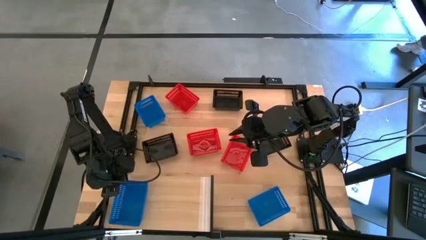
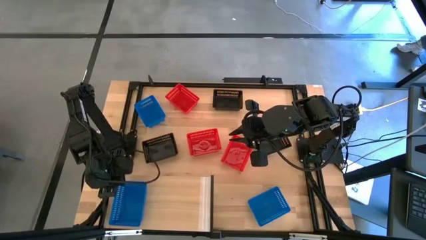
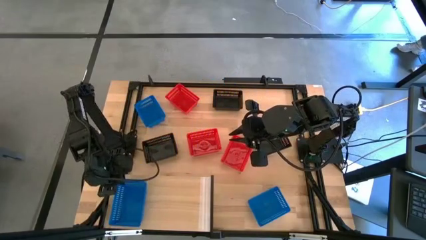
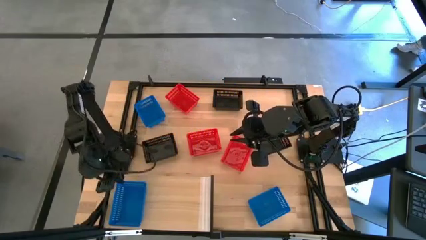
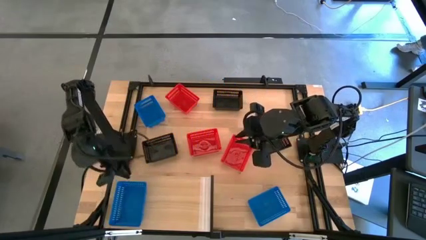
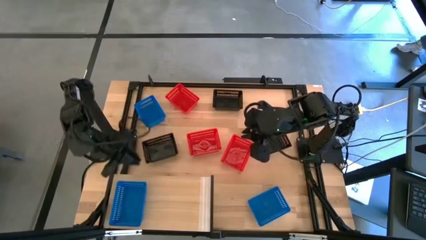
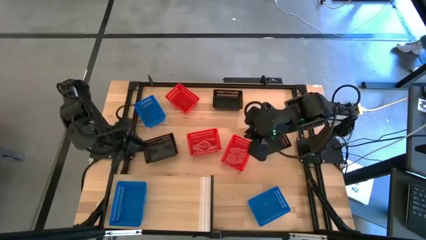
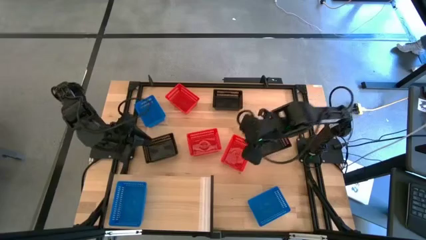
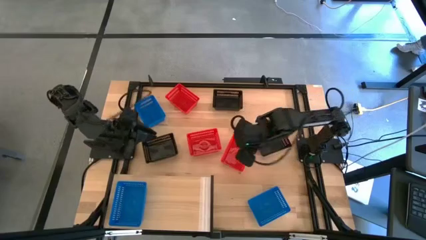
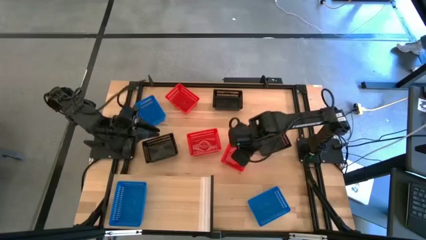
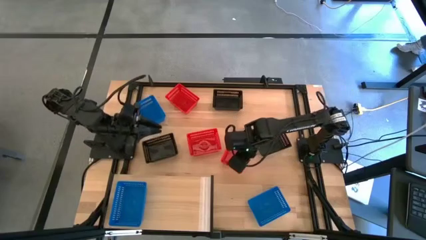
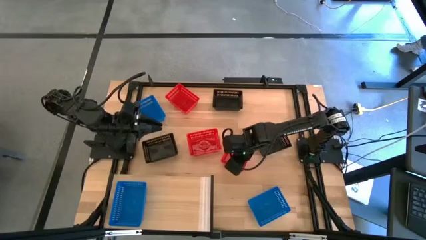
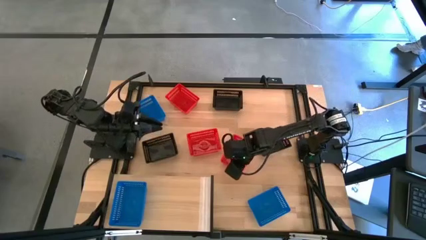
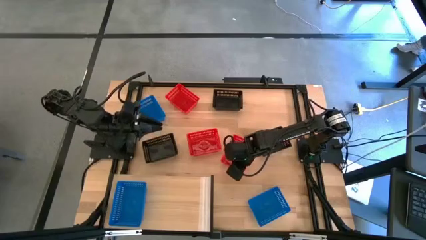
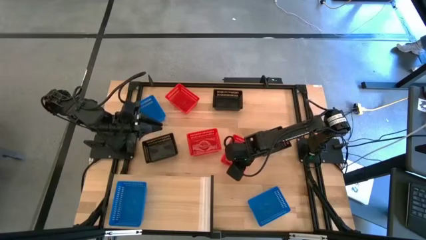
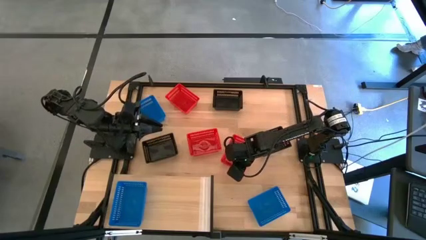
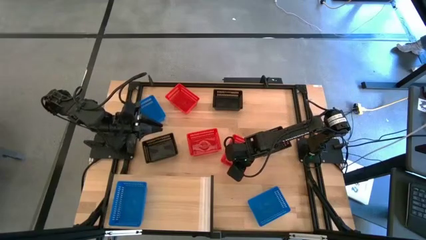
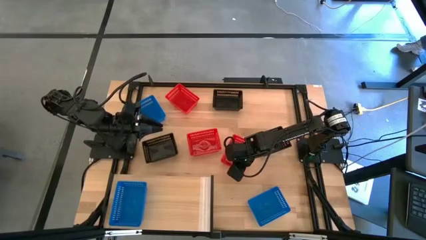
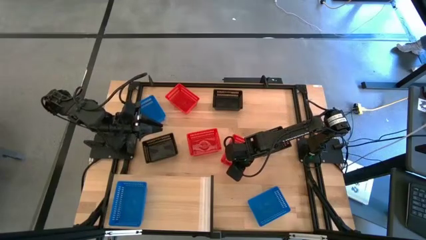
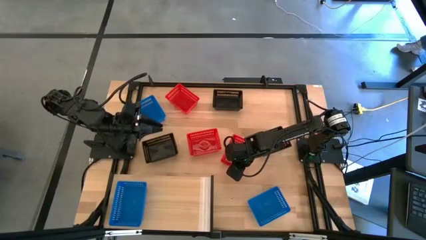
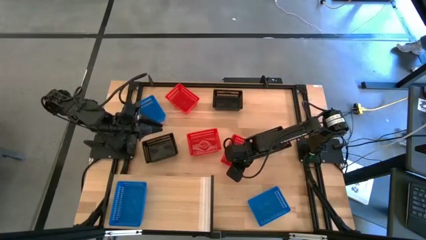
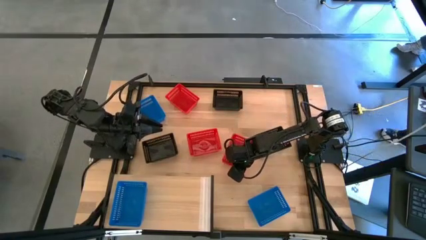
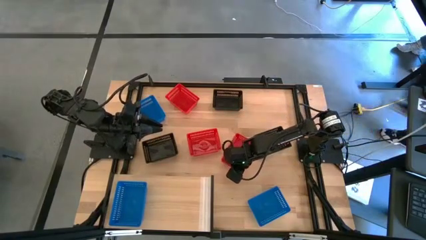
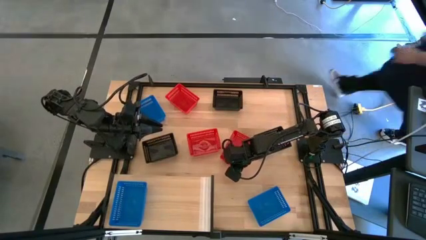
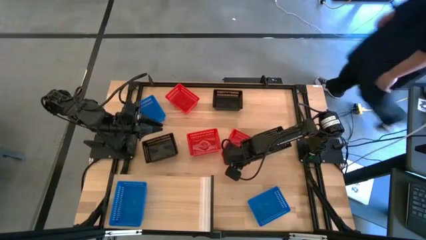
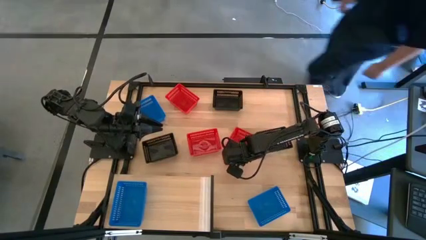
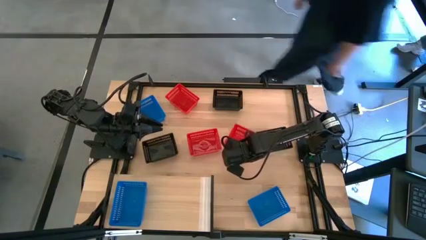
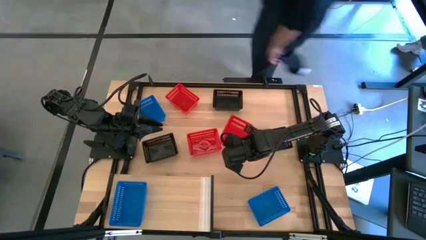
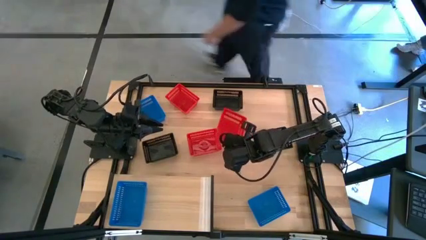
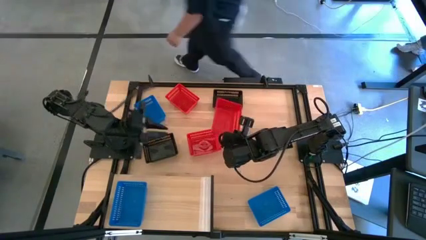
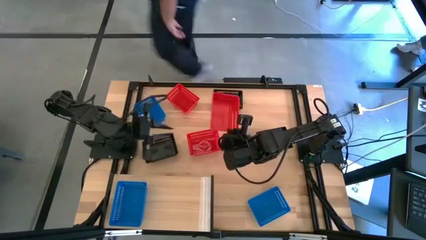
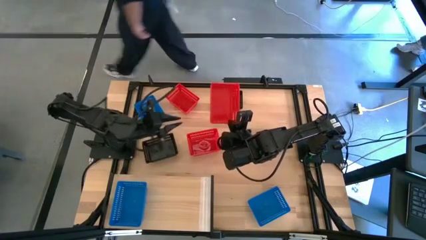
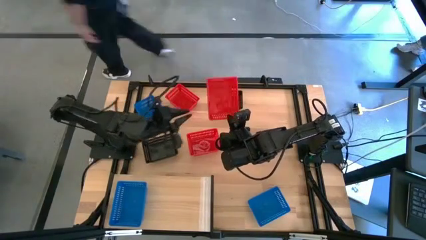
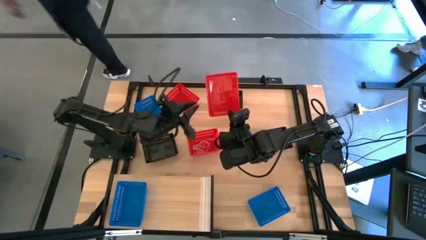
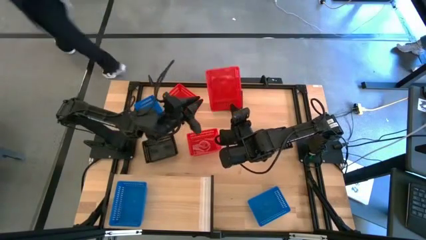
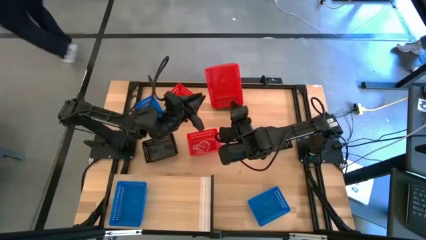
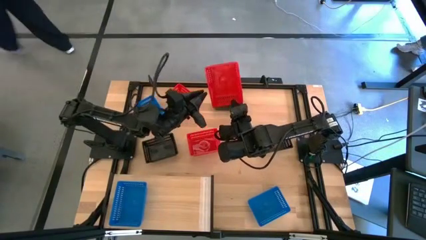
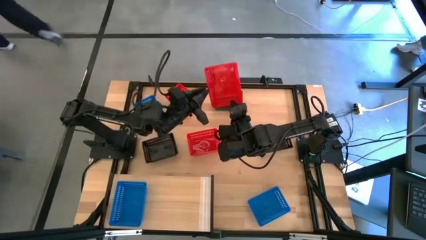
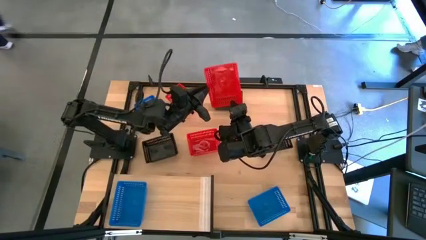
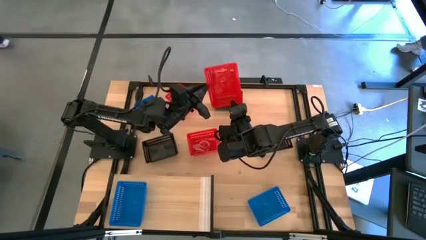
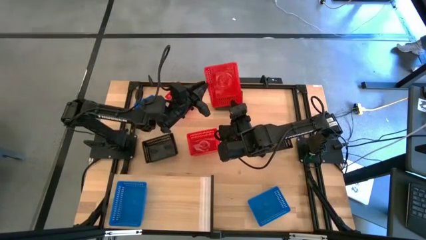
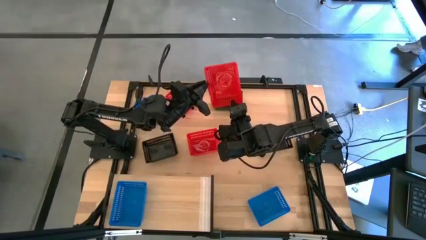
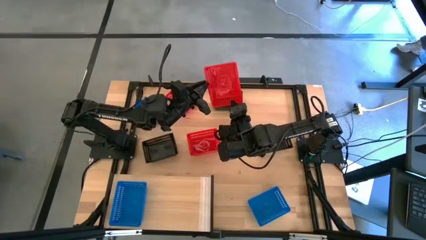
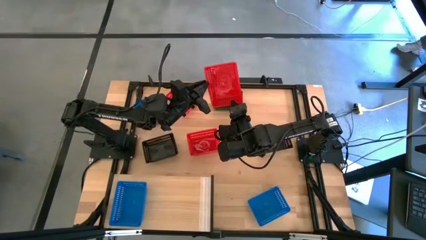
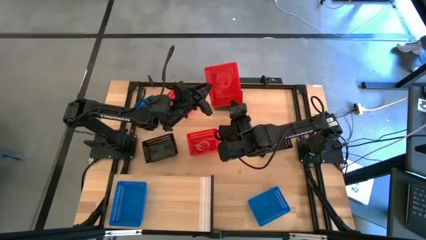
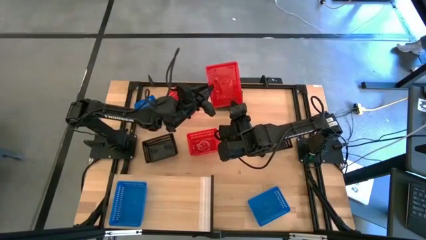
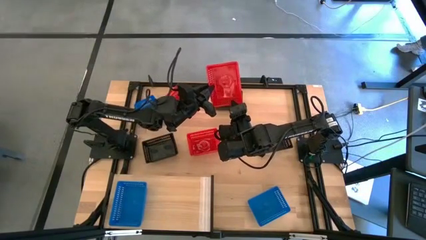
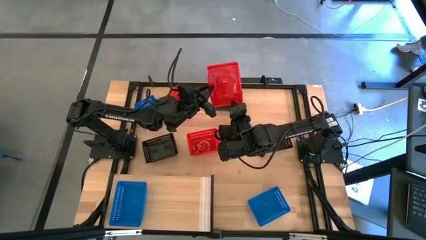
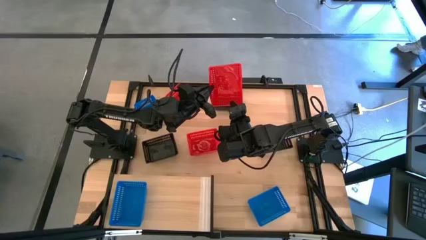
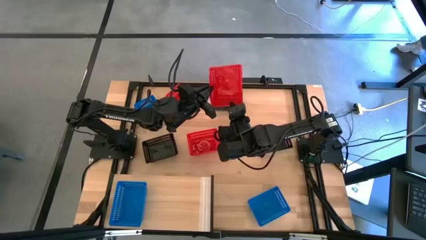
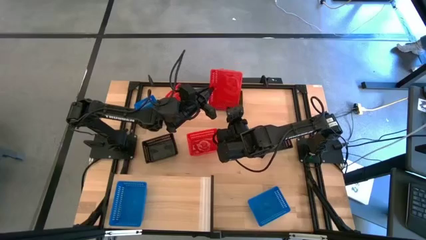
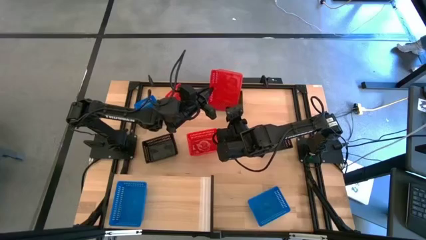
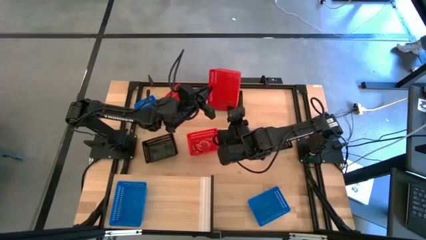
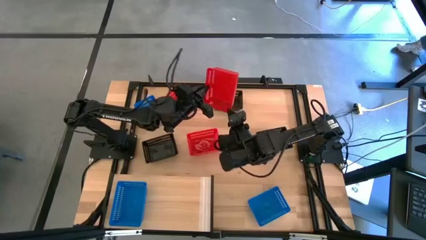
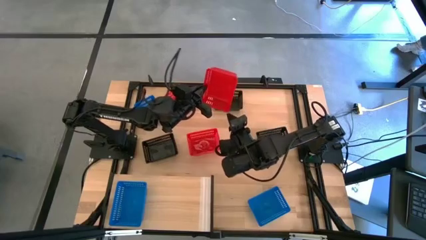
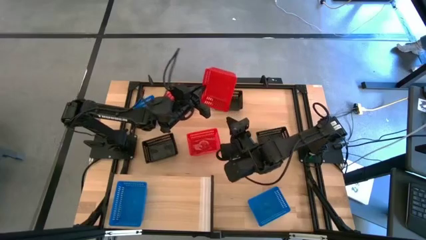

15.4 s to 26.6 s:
Task: Stack baskets on shelf by color
Put the right red bin on the shelf

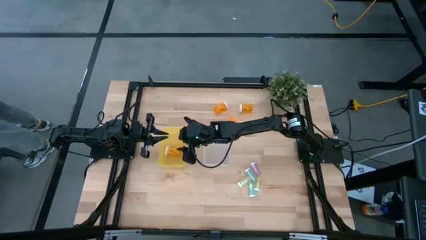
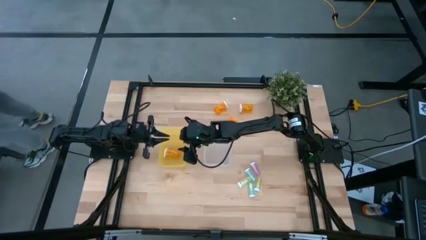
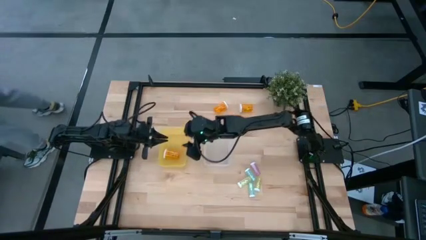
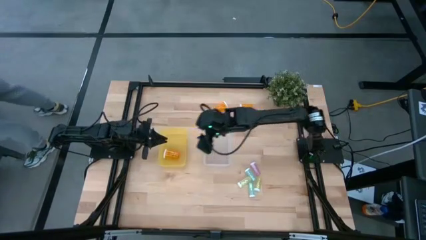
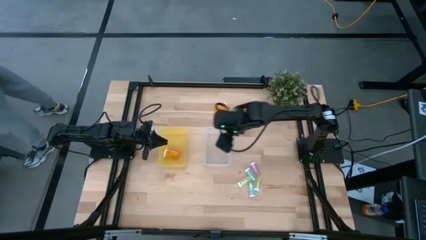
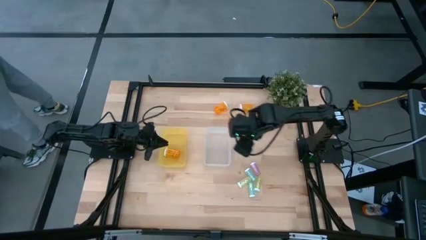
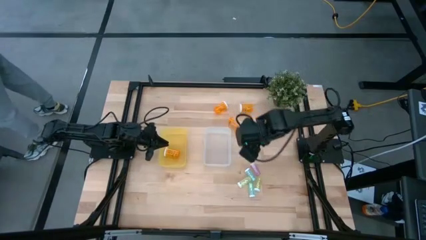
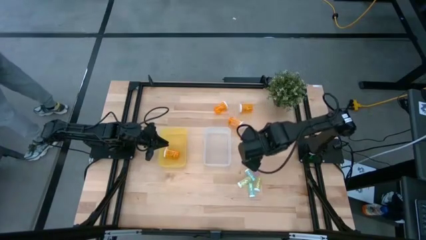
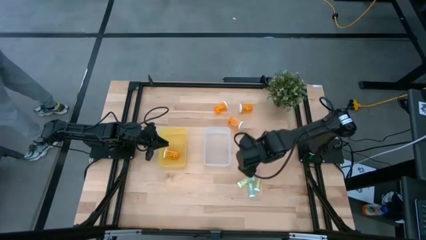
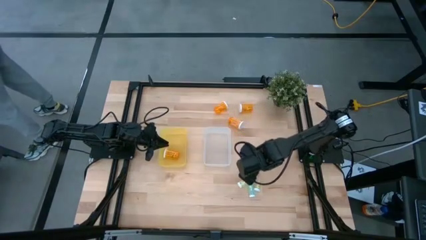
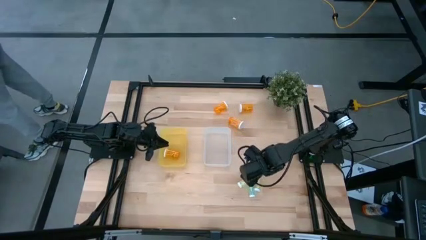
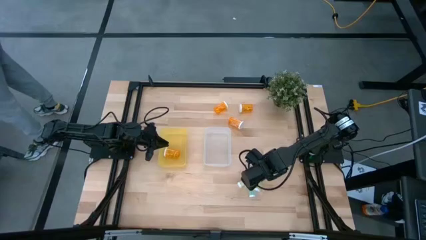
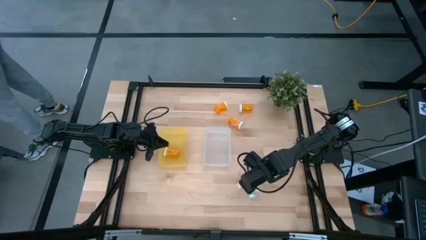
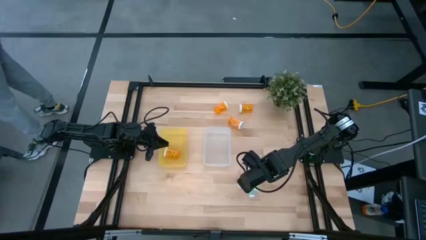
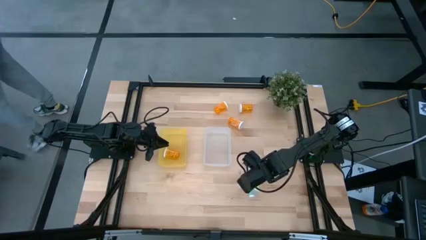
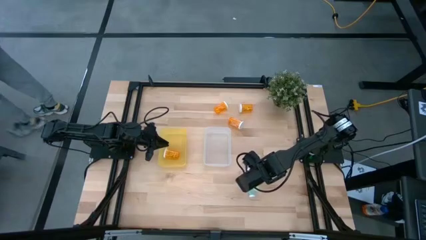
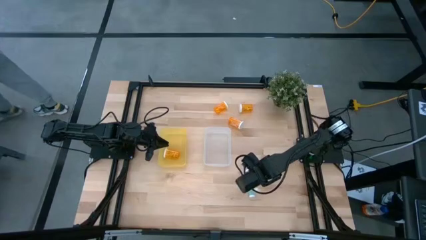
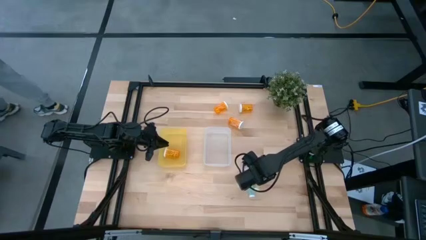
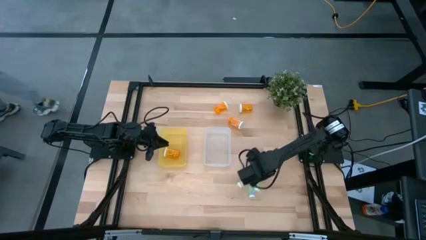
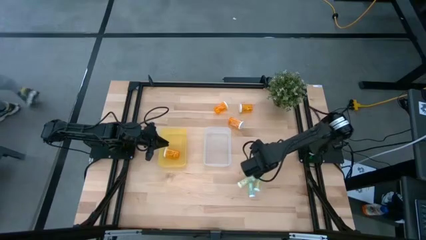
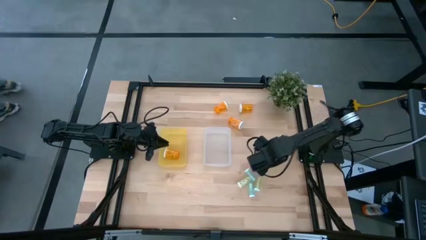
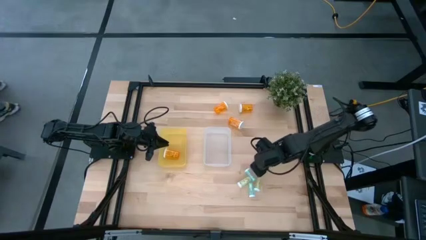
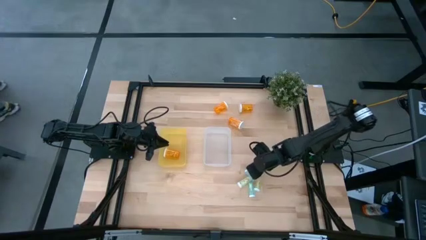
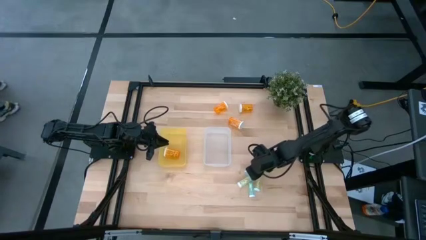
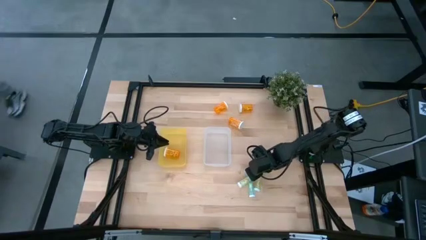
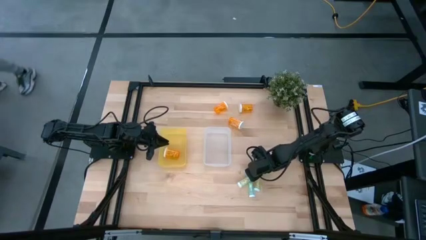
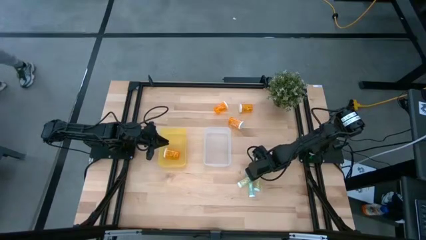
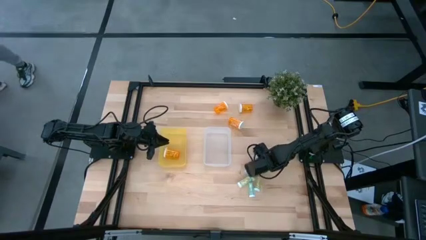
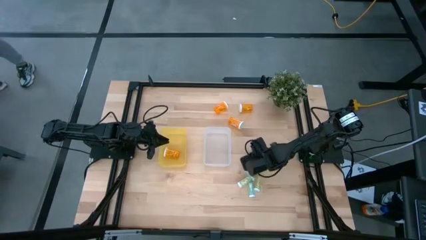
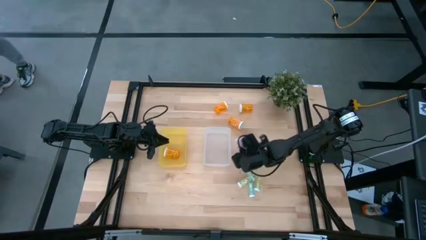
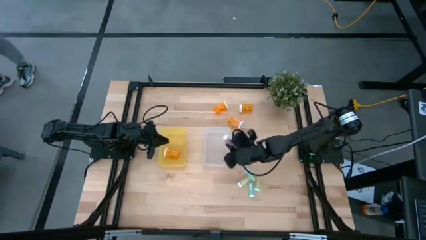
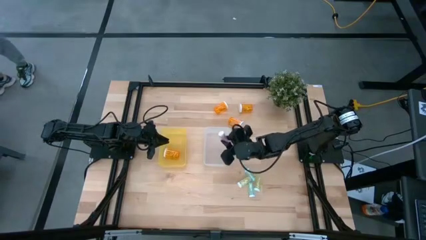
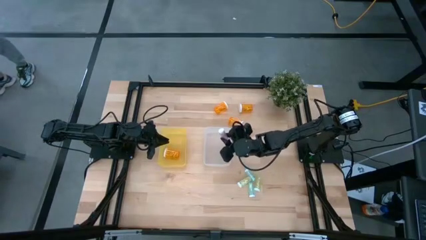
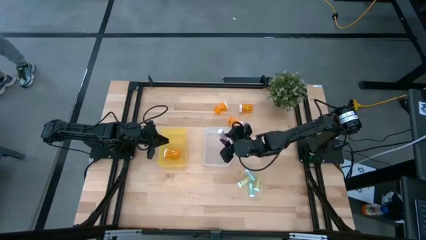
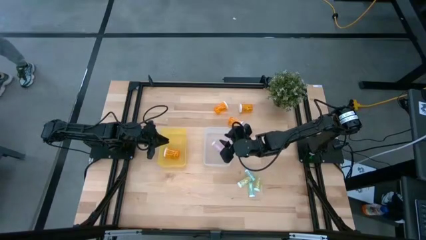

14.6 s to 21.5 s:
Task: Pick and place medicine bottles into bin by pill shape (circle, oval)
Put the pink pill bottle into the transparent bin
